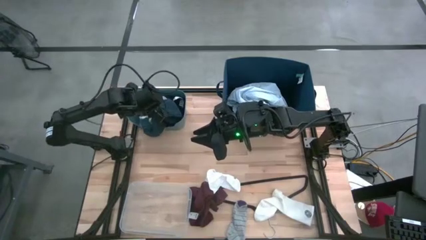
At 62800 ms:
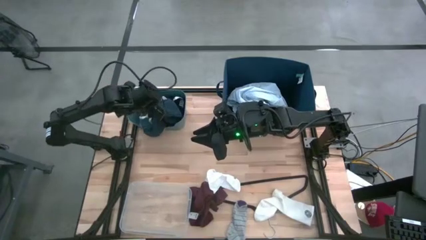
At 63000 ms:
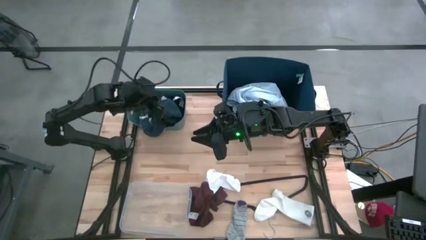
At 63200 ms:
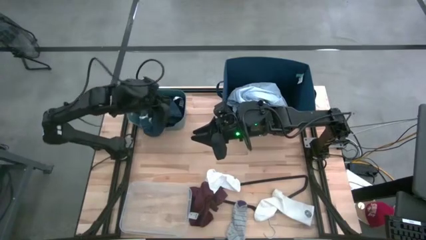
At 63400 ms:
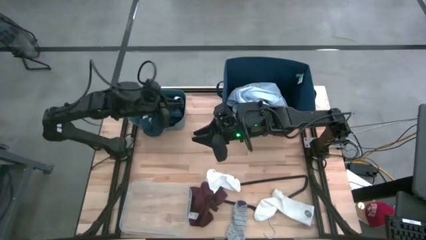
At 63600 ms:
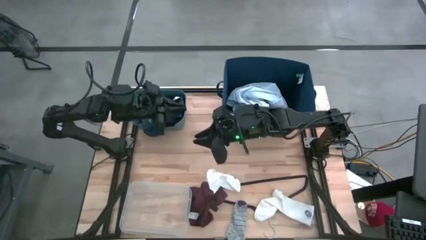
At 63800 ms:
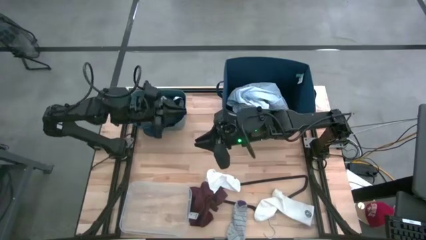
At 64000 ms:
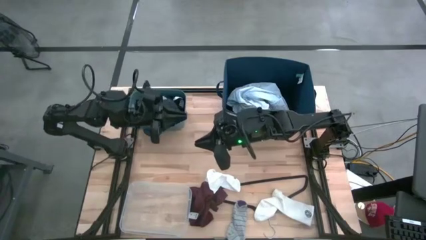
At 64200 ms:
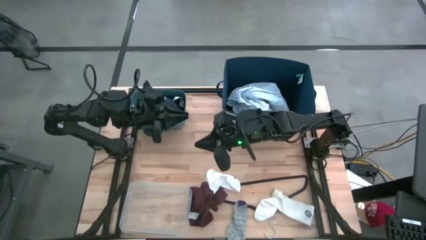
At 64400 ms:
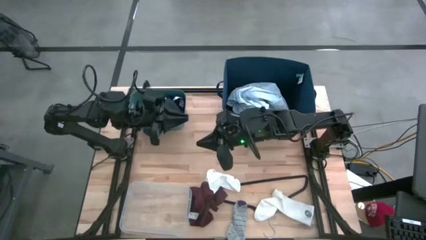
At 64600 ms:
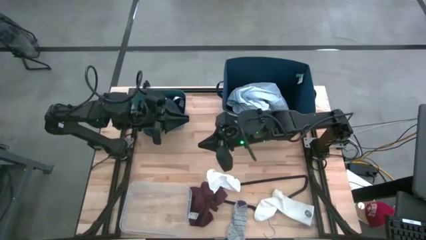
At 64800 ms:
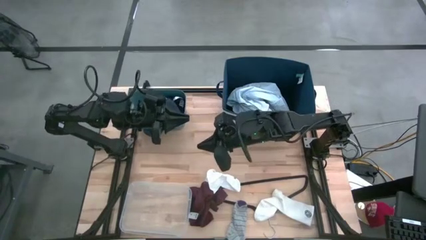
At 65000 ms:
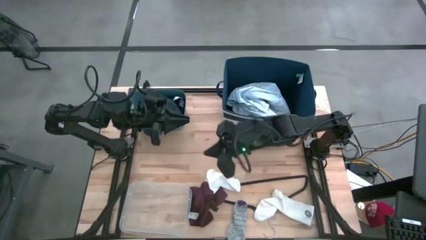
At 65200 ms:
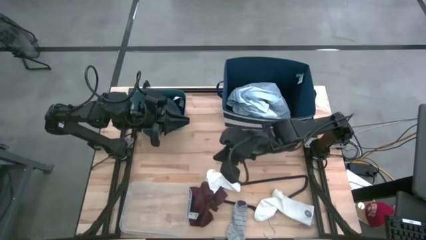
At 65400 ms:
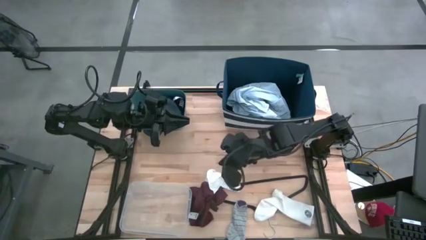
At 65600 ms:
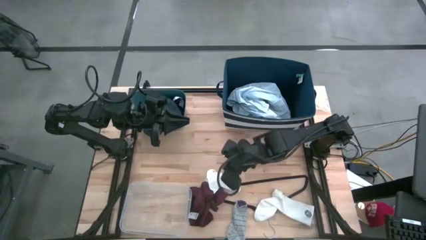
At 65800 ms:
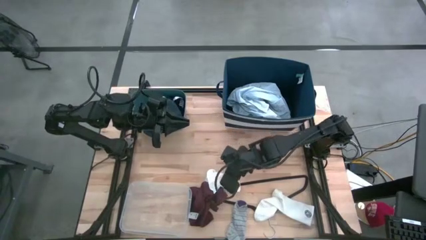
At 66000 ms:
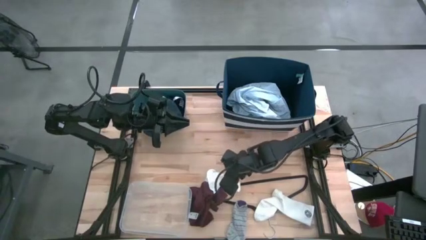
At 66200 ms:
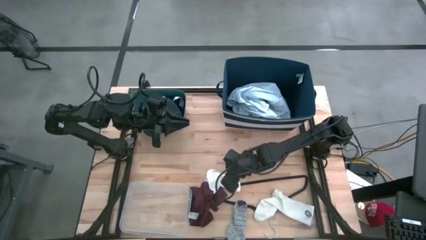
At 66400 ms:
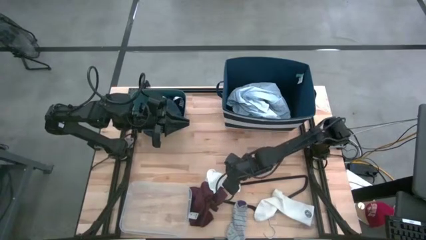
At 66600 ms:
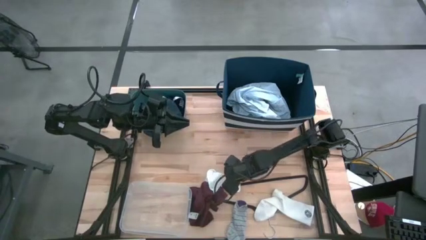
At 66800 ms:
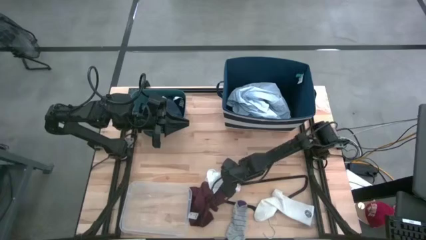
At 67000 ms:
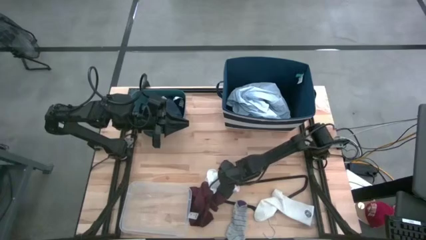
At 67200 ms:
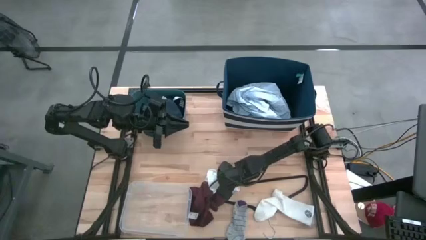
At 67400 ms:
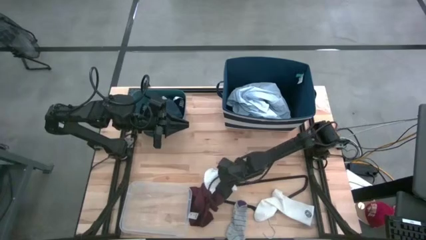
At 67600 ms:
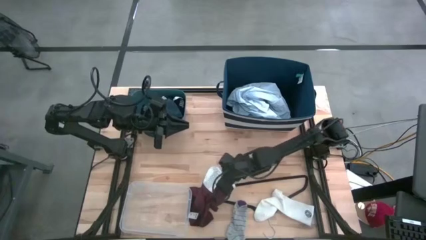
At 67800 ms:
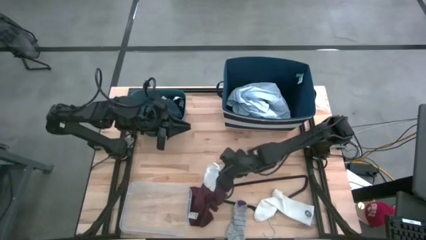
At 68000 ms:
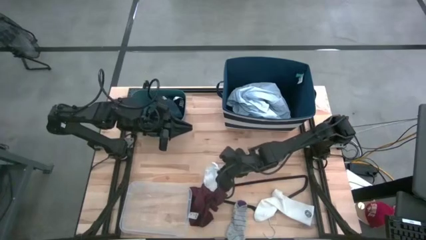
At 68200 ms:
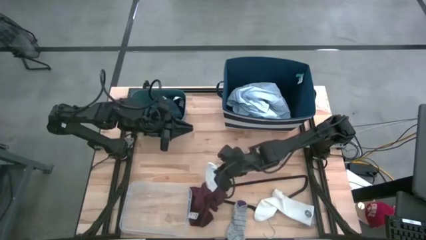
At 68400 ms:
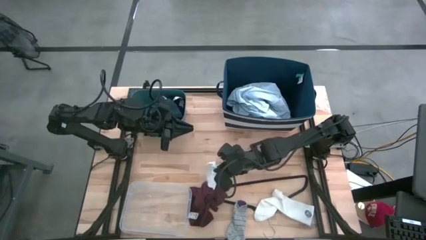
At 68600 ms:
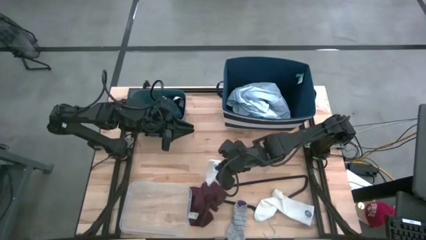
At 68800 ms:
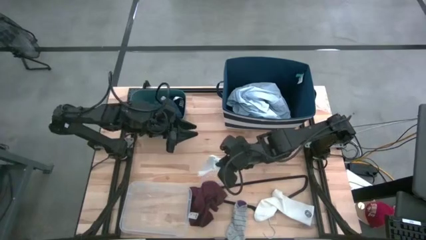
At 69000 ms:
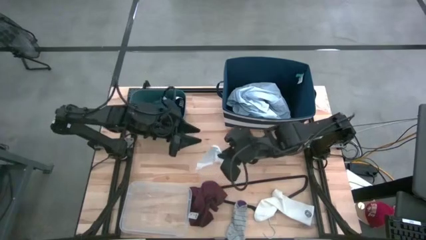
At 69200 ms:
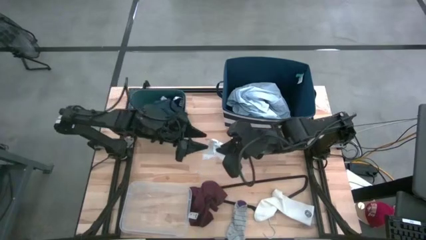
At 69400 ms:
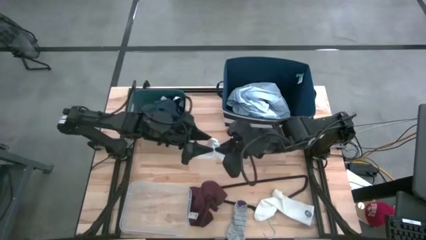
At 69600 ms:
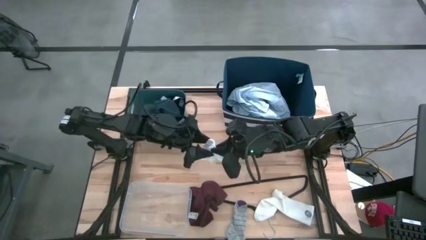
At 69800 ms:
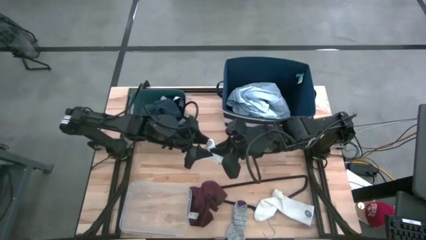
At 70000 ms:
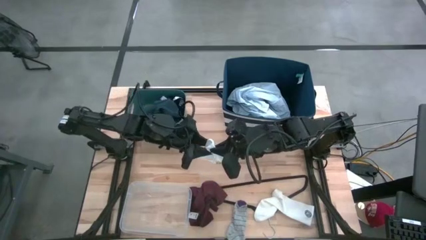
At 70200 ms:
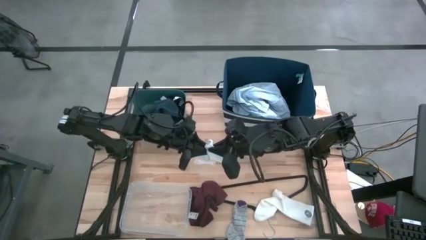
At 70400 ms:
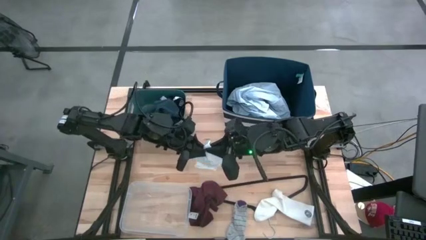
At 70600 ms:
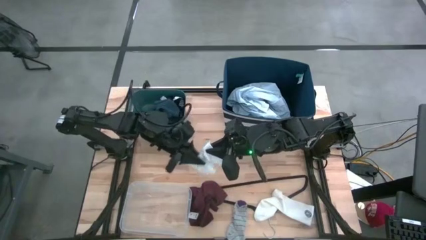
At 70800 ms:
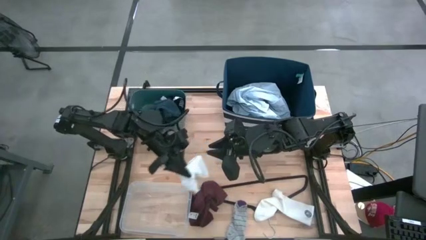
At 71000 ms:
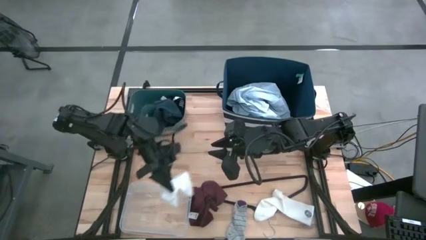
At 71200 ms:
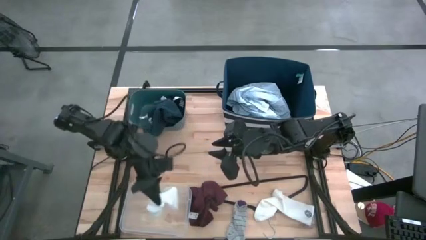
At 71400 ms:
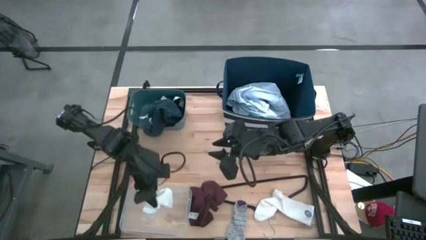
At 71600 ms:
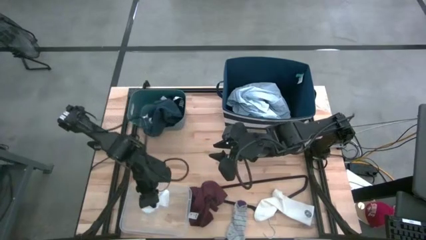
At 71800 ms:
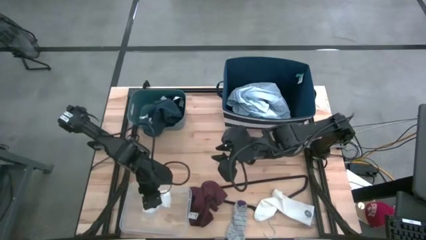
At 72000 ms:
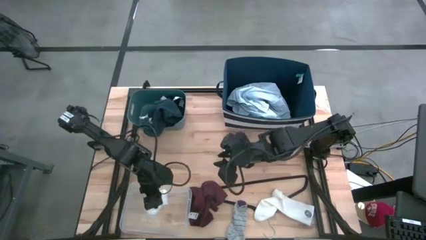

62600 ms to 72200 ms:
Task: Pick & Place Cloths
Put the left white sock into the transparent bin

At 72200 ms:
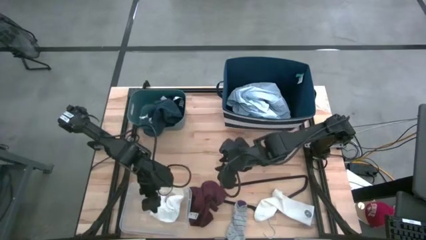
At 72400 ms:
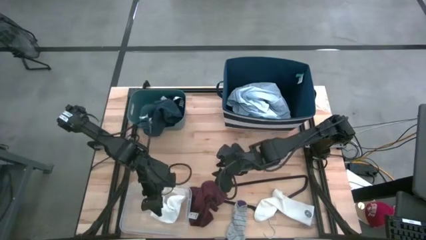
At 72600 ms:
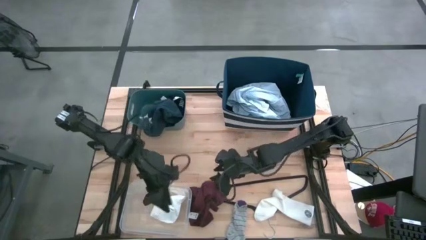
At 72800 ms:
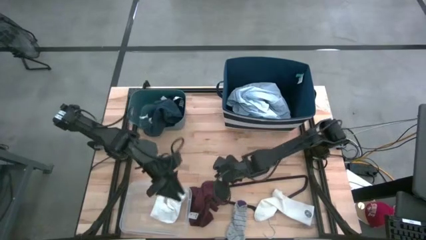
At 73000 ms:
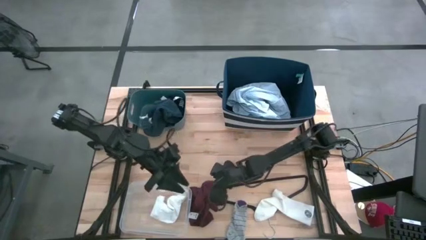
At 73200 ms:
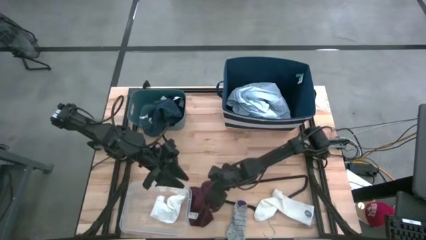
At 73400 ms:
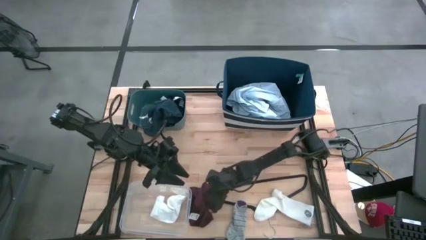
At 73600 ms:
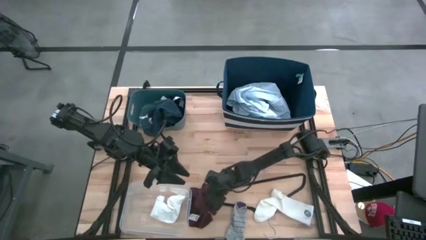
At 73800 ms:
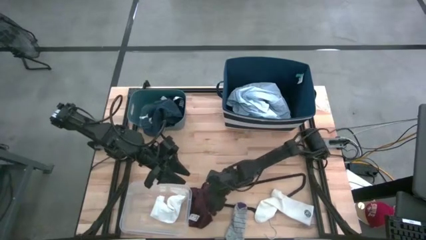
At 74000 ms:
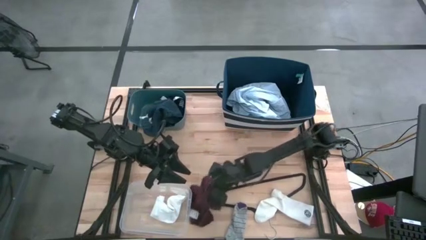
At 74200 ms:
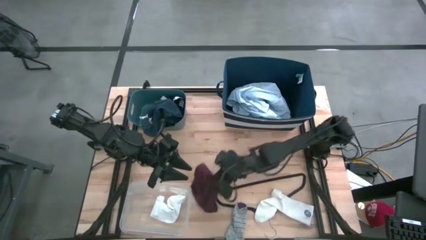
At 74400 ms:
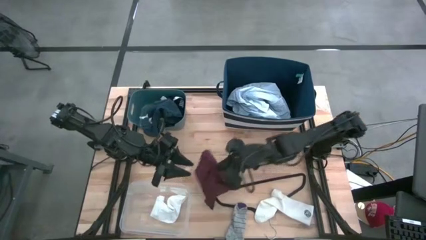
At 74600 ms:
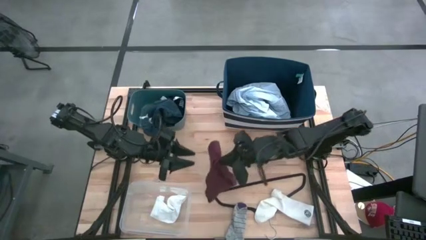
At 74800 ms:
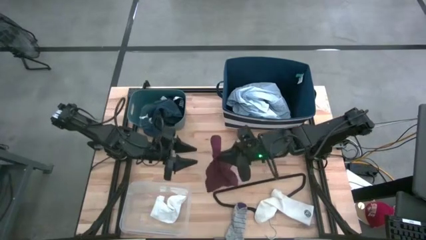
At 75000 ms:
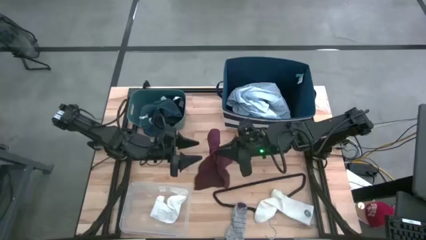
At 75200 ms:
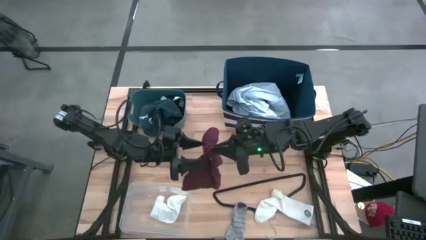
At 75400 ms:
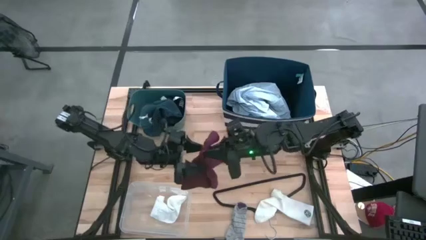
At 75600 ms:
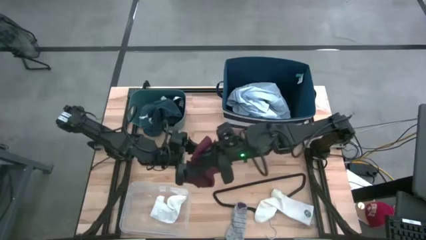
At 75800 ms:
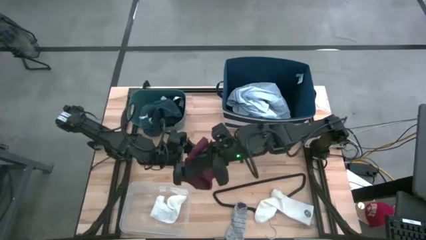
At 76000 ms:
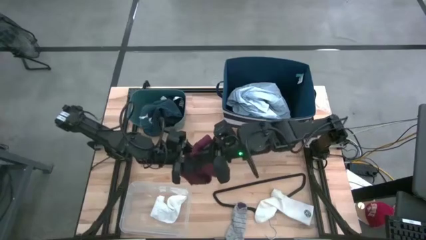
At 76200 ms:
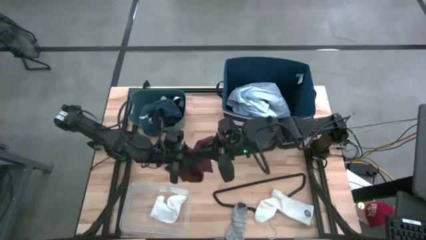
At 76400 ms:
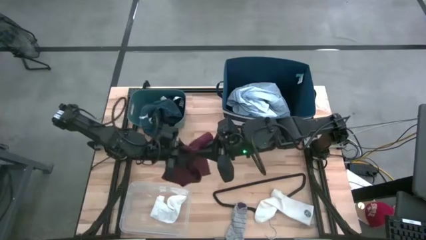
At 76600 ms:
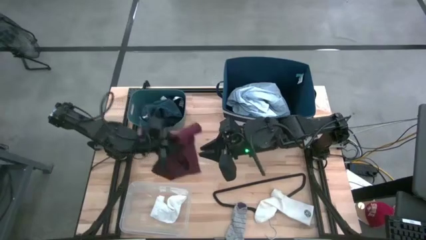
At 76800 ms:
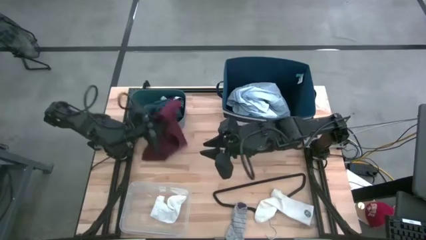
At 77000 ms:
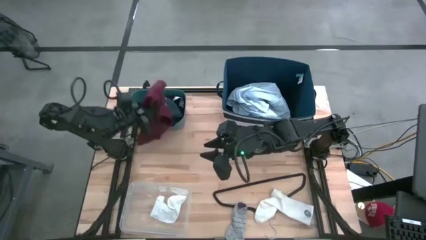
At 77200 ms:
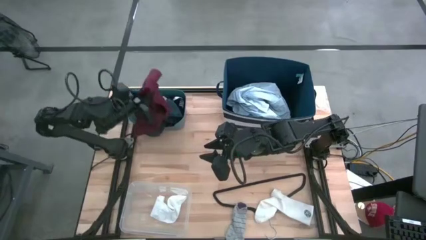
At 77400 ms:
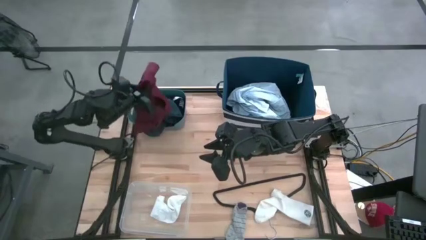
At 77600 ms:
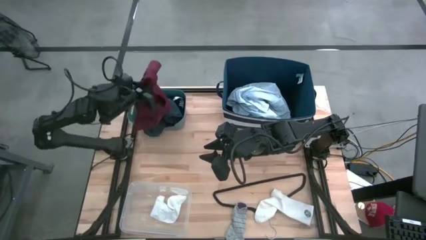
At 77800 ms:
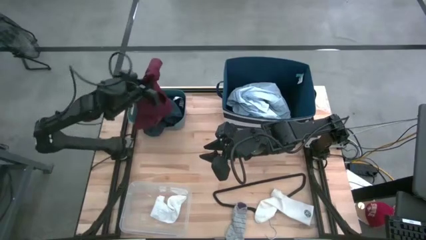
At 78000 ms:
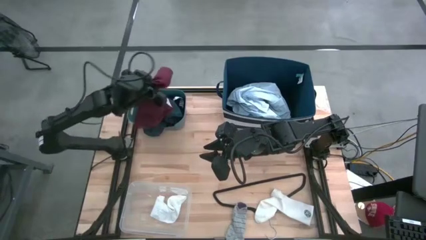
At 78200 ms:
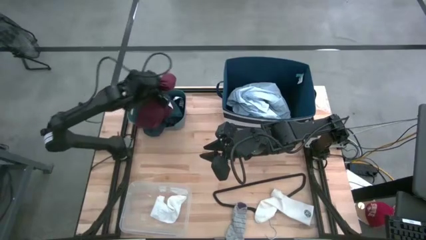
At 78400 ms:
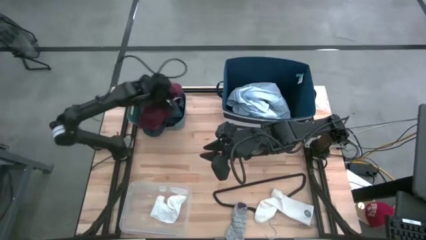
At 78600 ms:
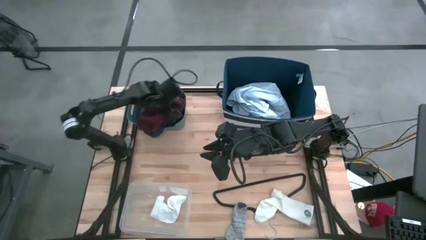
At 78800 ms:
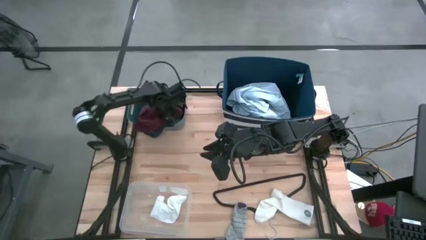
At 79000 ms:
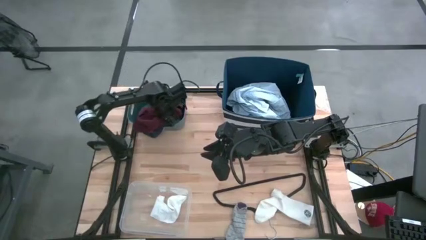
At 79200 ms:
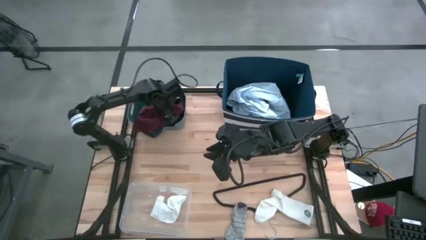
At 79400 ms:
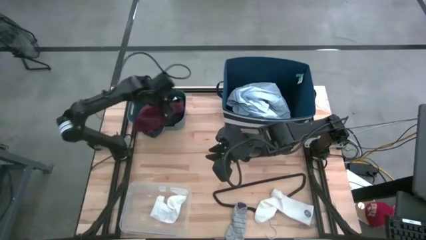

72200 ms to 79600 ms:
Put the dark red underwear into the green bin
